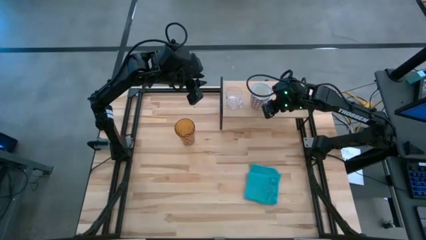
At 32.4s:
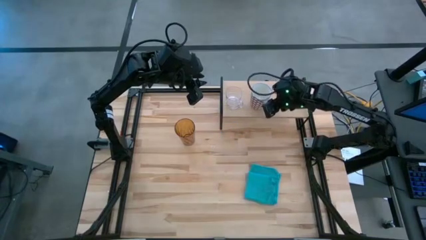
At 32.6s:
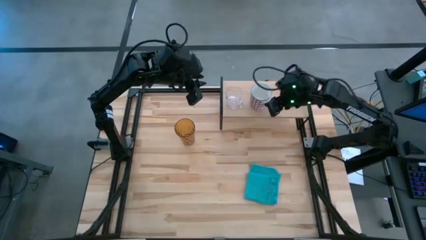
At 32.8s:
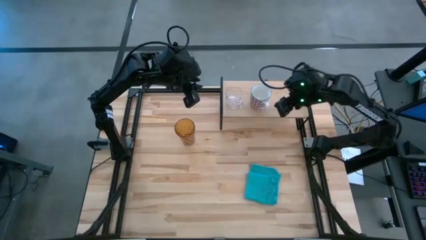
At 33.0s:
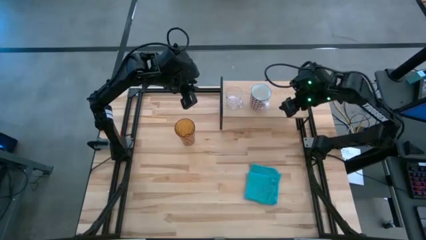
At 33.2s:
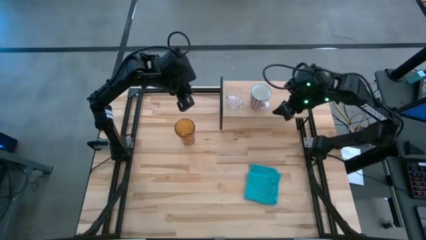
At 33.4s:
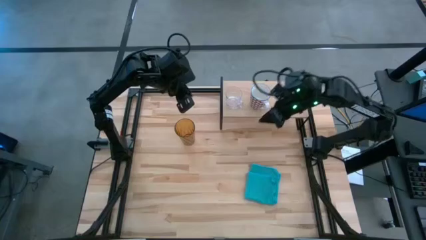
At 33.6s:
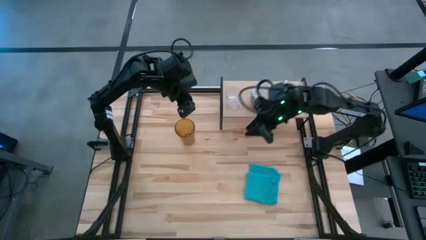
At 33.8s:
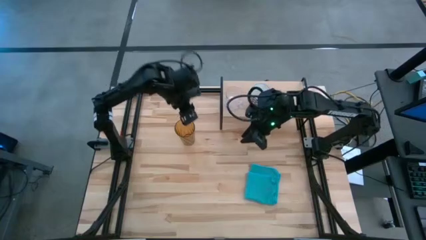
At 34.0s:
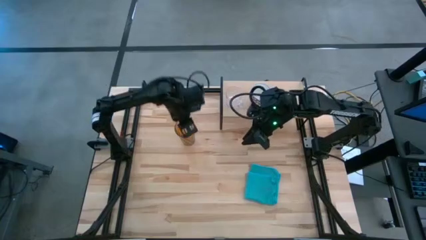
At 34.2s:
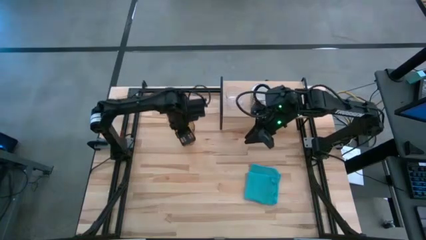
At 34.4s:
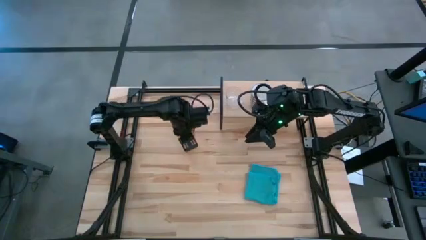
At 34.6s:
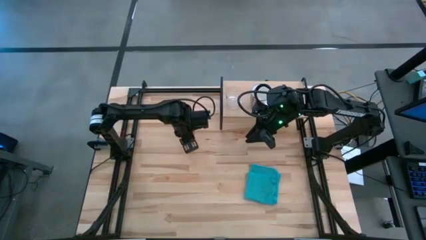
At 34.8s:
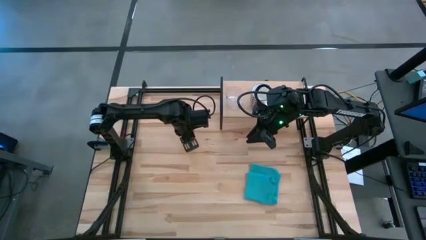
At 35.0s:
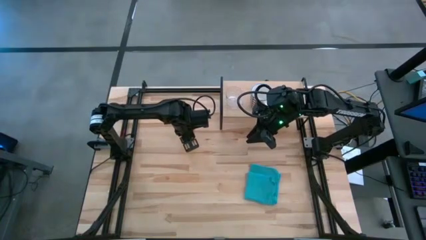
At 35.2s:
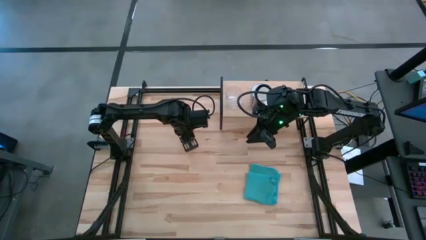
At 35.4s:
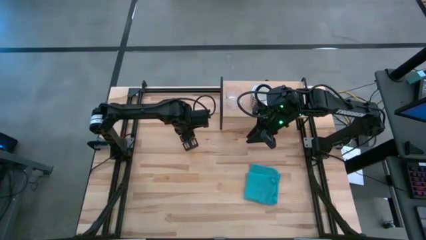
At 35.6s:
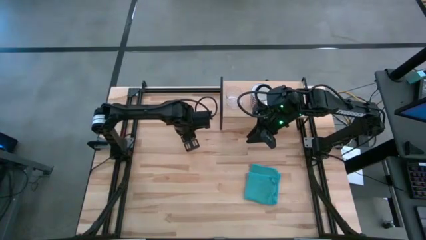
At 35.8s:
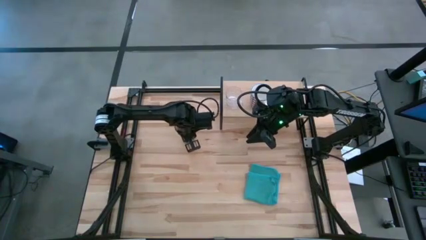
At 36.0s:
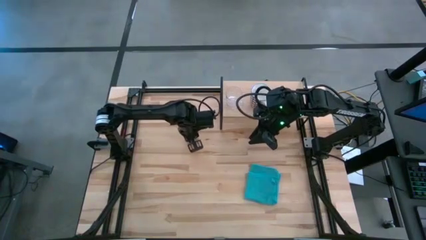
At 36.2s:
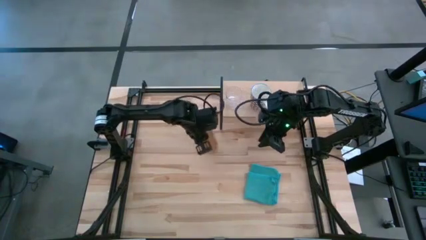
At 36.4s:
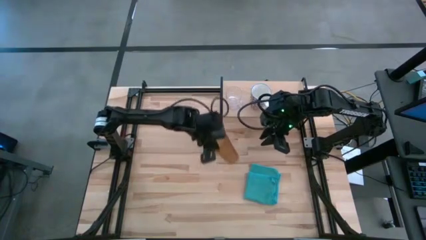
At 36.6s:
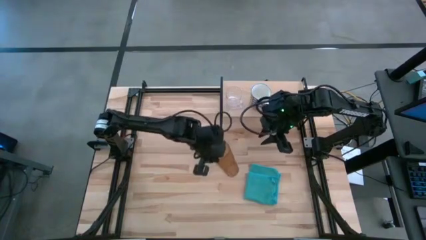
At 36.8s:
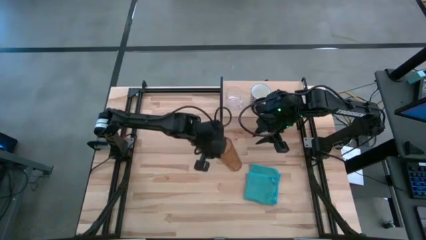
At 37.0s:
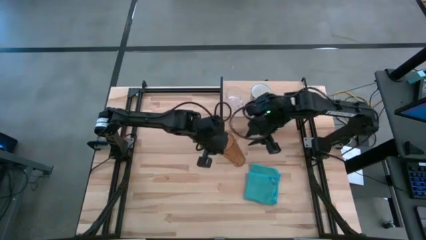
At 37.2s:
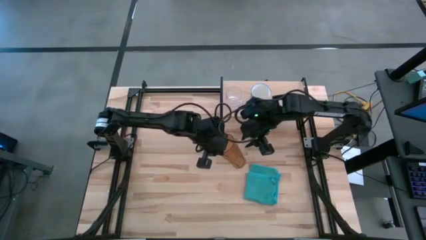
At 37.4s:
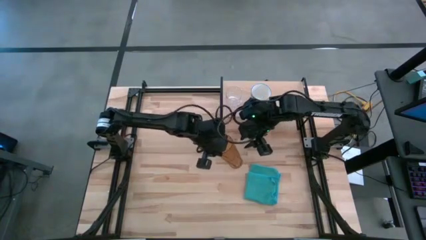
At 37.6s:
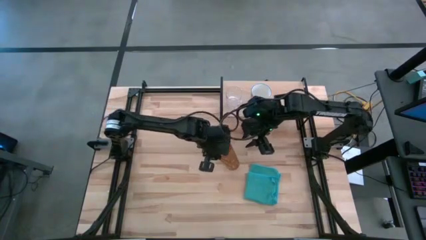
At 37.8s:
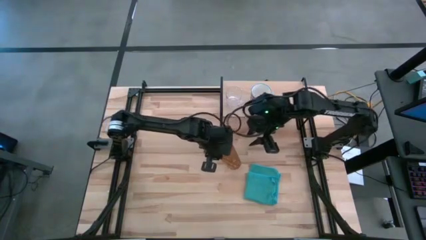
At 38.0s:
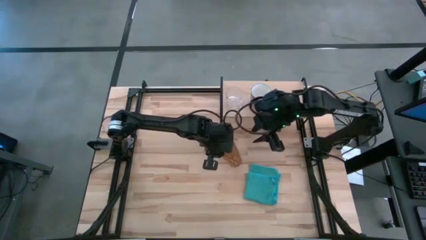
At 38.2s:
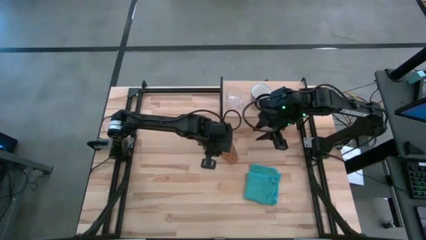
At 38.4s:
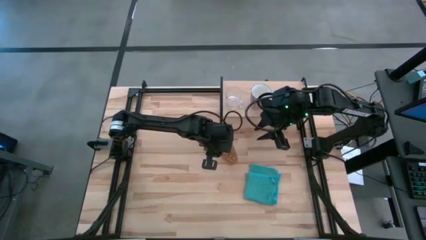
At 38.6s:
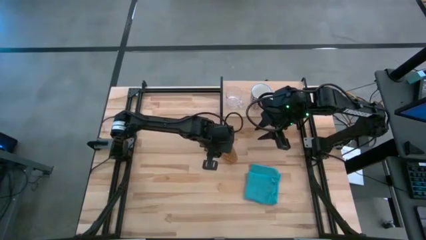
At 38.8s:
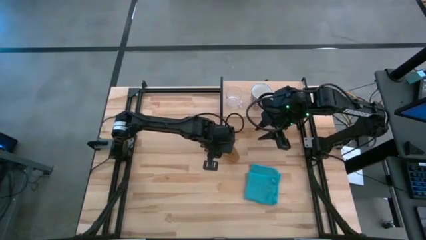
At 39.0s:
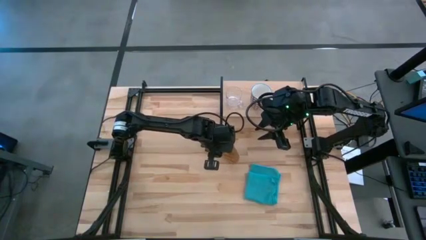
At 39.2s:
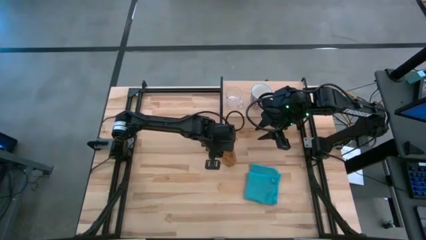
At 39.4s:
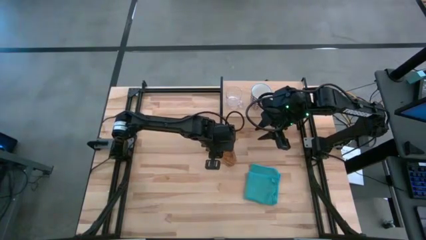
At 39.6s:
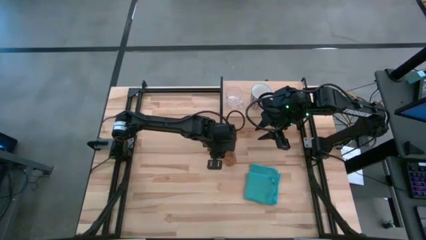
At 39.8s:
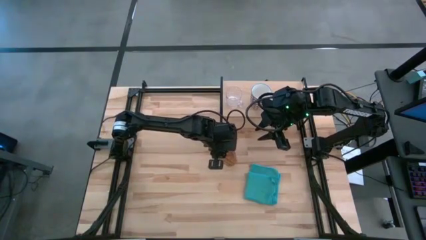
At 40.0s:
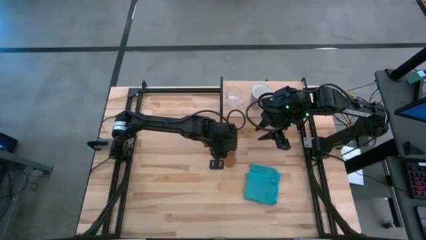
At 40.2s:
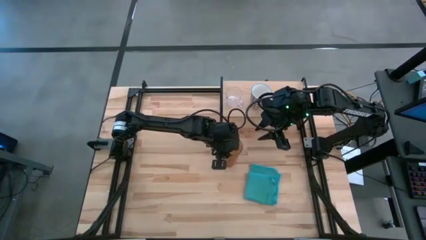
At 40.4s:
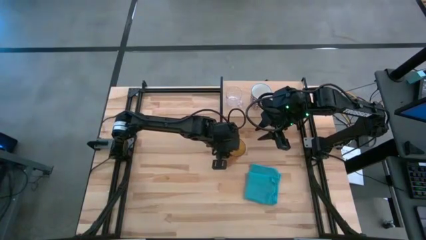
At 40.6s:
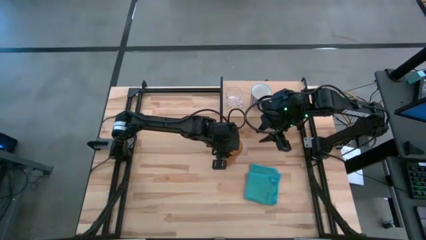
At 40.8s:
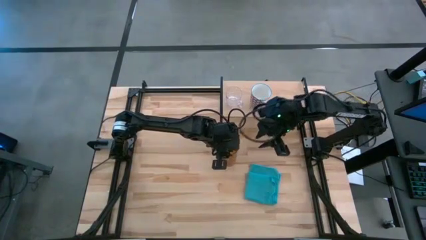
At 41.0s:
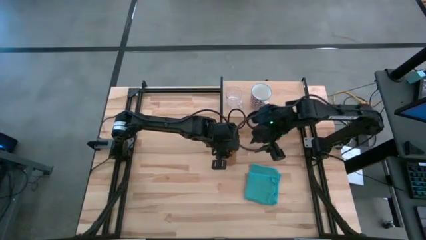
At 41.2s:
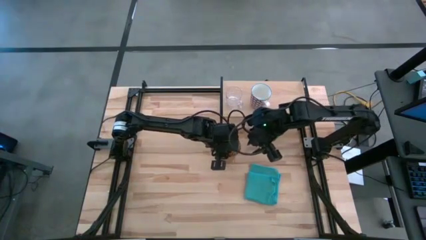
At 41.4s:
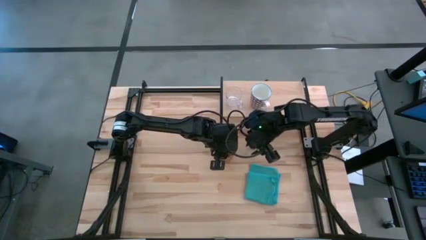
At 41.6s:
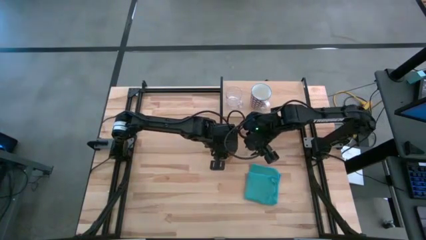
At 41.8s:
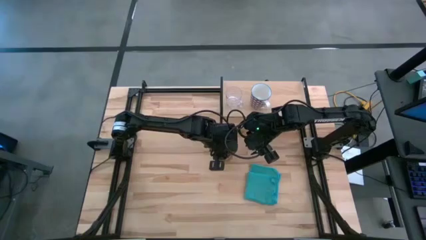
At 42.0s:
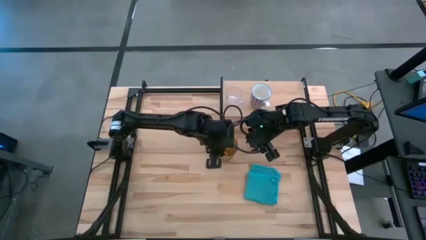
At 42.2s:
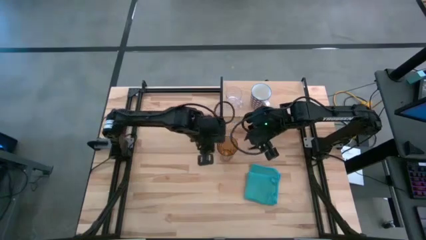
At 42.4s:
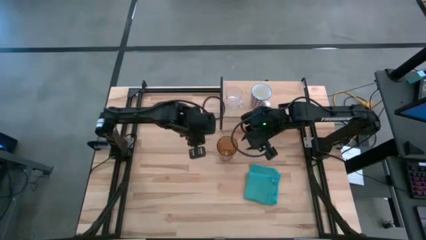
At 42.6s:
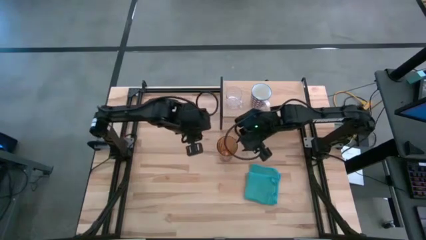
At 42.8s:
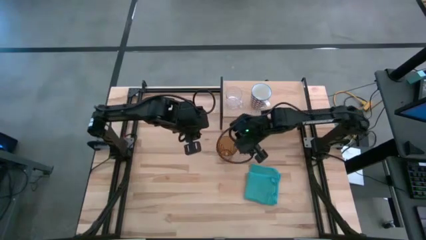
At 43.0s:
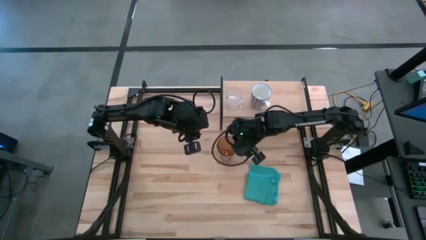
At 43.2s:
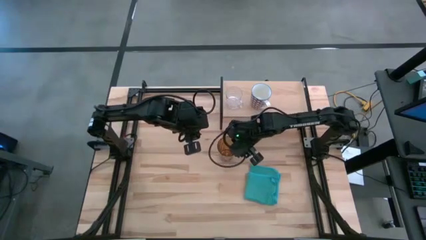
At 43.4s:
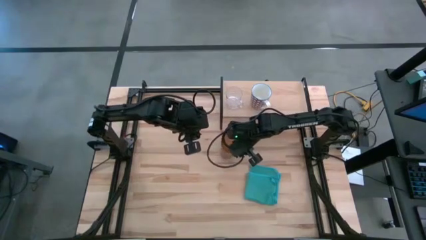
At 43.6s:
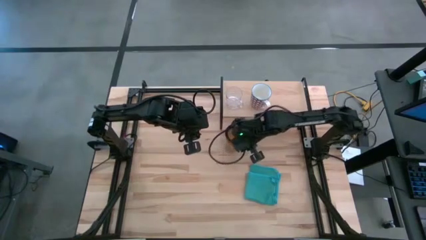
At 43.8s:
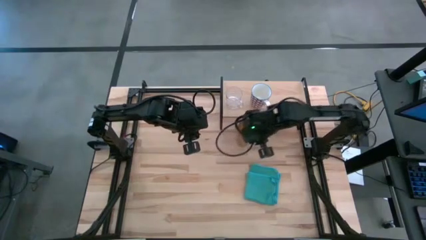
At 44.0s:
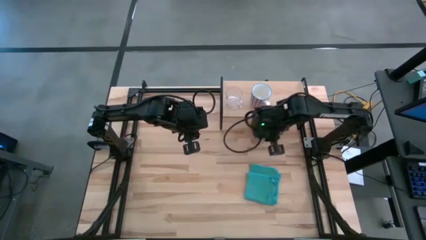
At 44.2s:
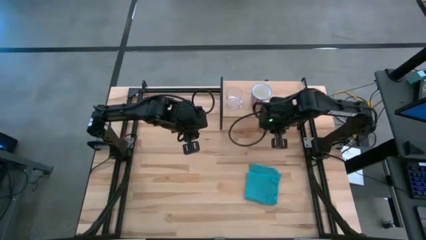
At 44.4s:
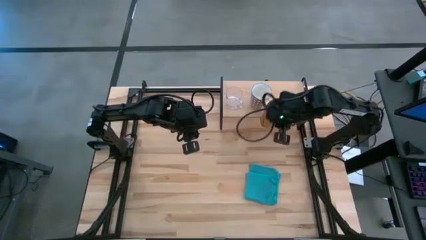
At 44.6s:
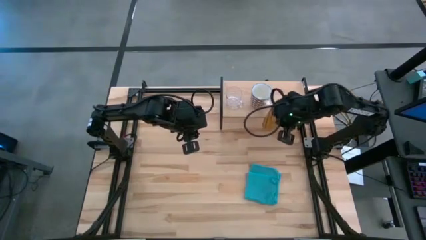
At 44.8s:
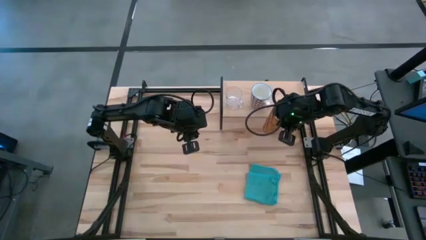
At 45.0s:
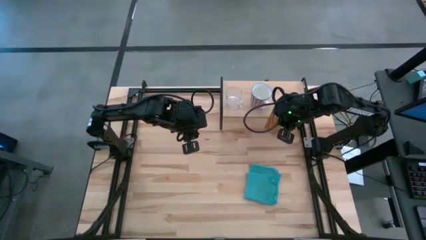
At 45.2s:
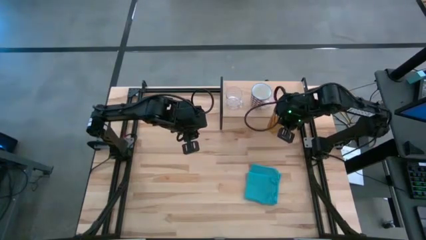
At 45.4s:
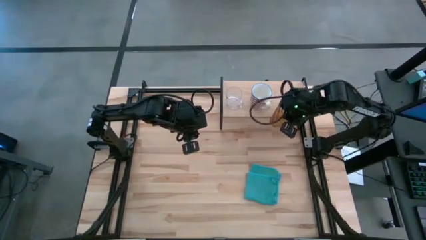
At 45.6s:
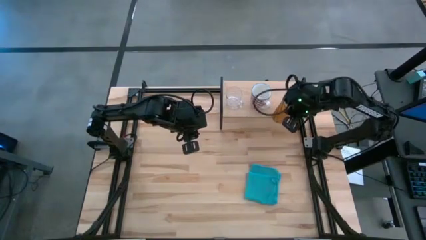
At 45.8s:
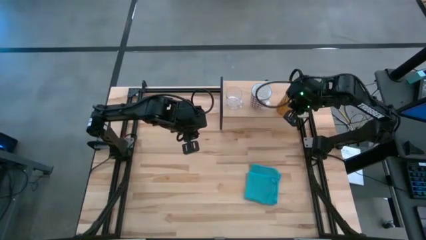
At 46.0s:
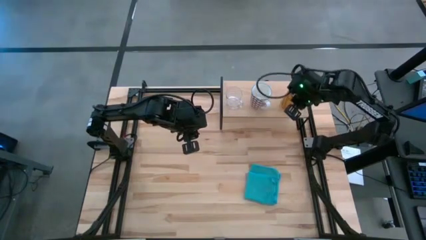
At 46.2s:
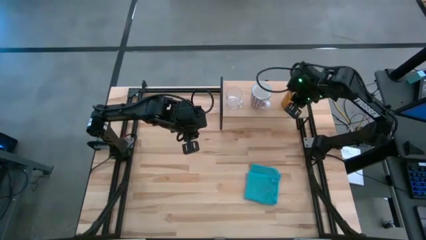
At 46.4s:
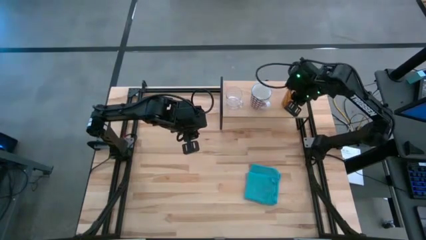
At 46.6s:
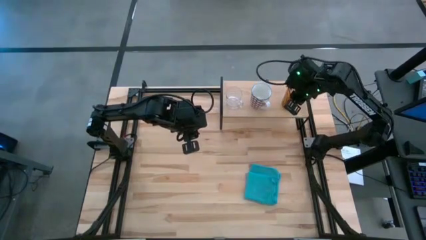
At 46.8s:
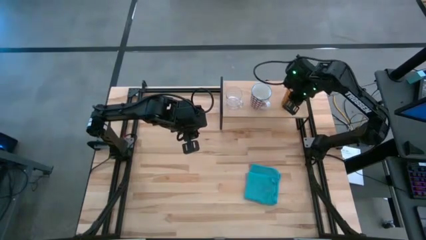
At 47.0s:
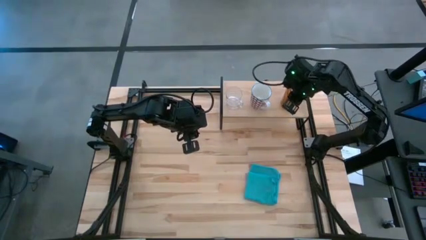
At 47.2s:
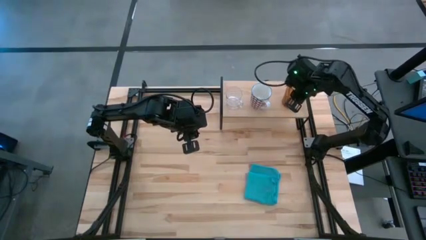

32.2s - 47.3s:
Task: Stack small to large cups/mugs on shelf
Put the brown cup on the shelf

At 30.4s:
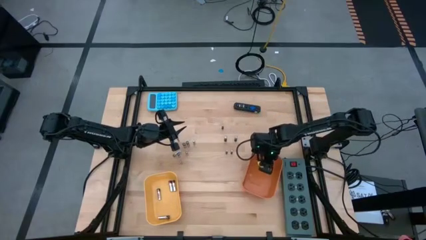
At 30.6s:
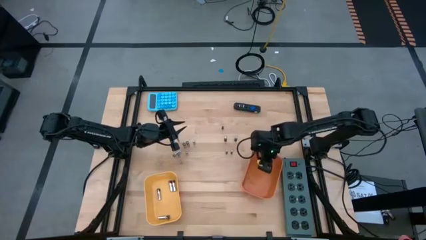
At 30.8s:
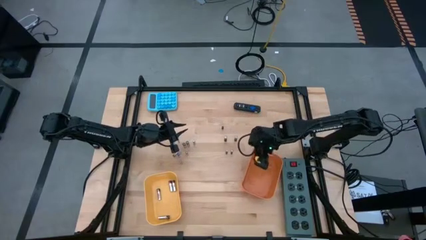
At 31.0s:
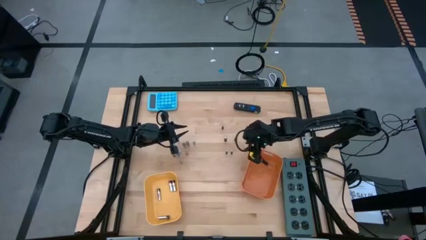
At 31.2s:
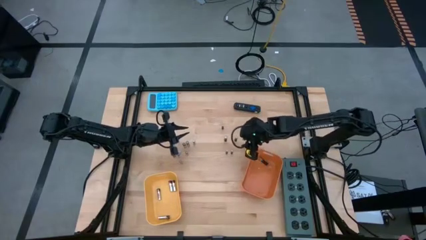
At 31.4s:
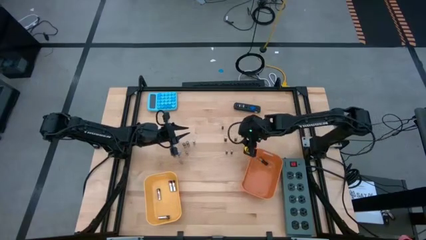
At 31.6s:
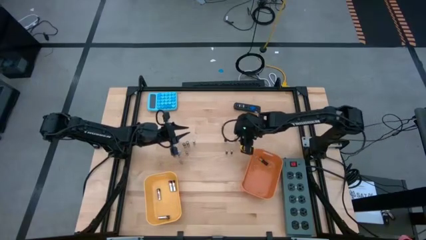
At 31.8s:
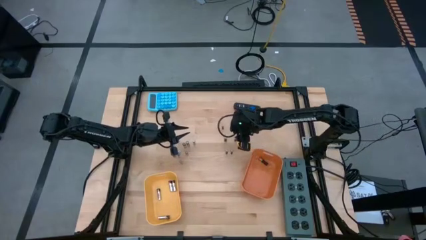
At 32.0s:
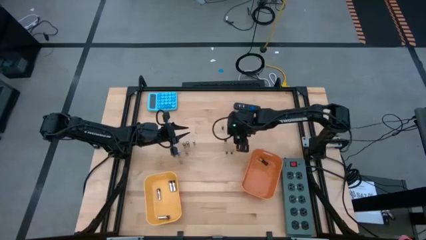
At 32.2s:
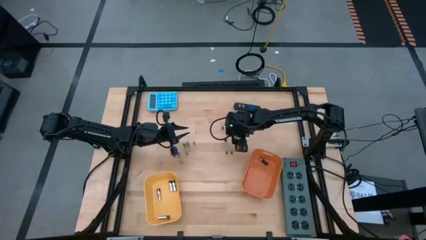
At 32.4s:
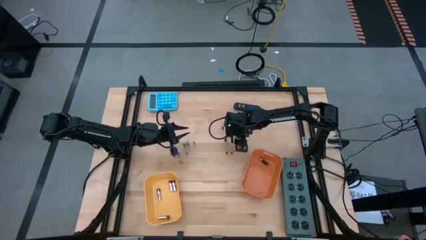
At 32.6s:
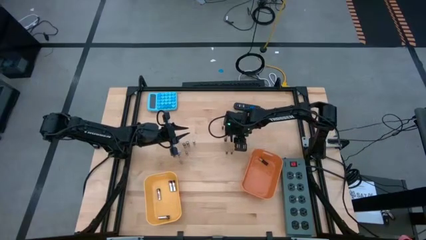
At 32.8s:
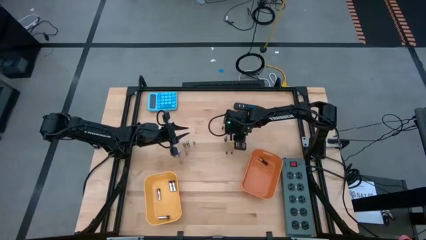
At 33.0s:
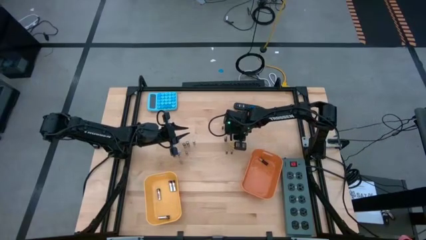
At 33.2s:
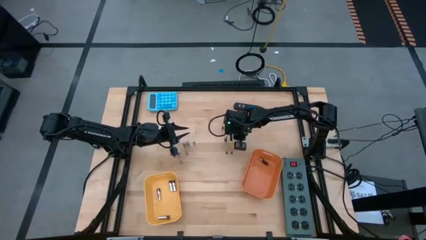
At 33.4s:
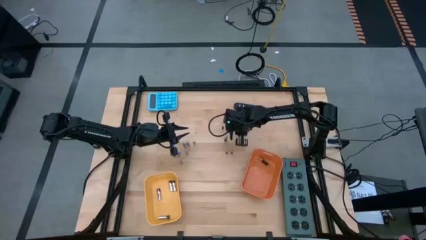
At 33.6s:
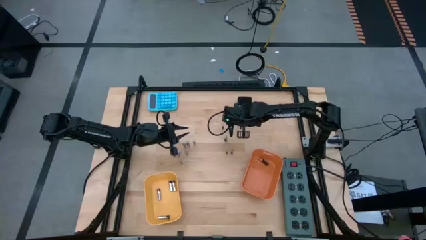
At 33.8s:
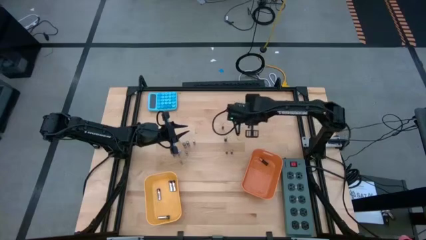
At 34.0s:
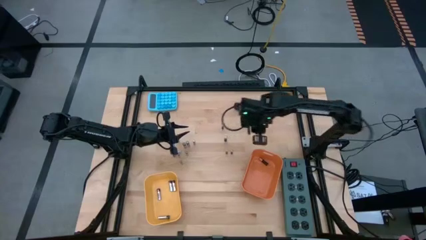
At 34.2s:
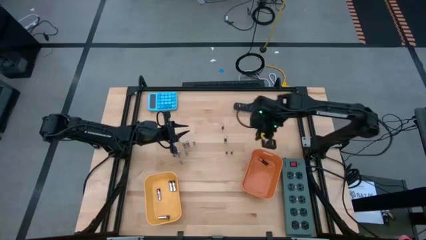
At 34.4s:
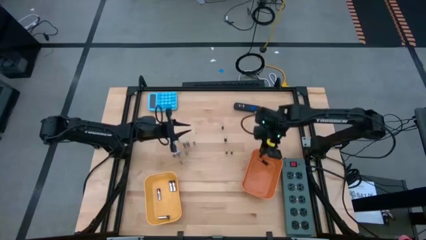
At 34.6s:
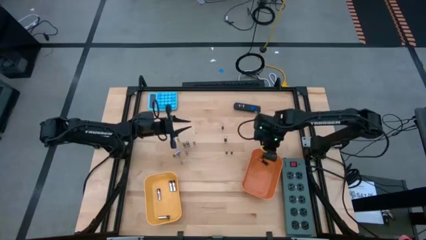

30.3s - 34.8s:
Task: Sort batteries
Put the brown battery into the orange bin
